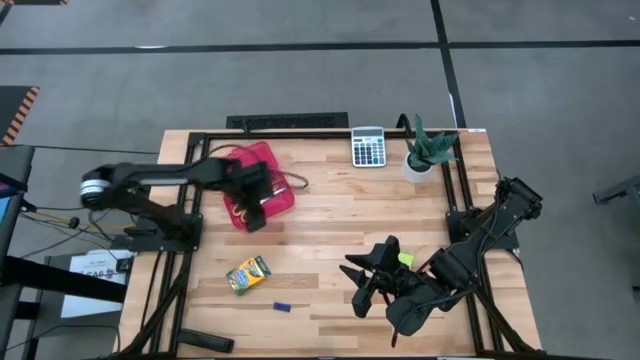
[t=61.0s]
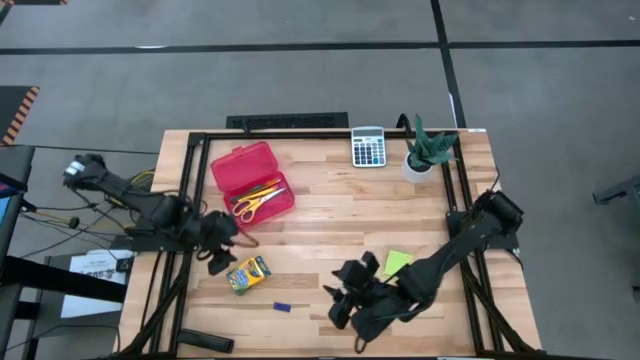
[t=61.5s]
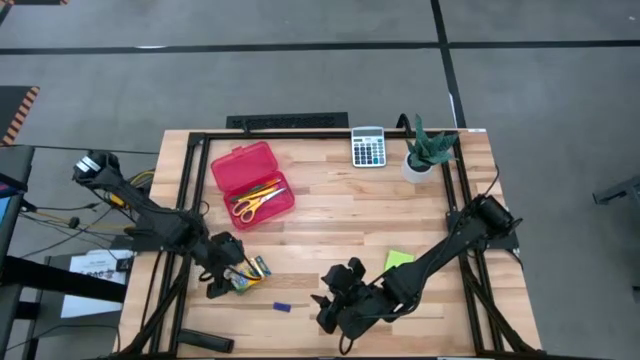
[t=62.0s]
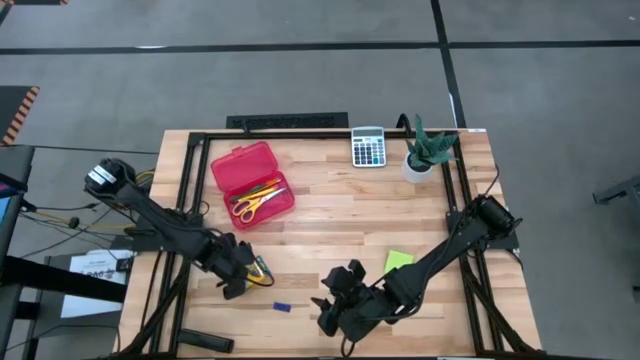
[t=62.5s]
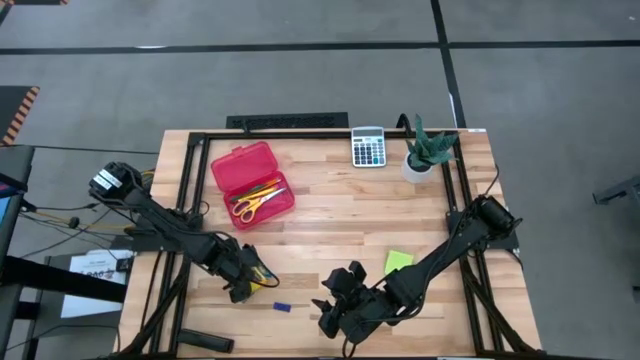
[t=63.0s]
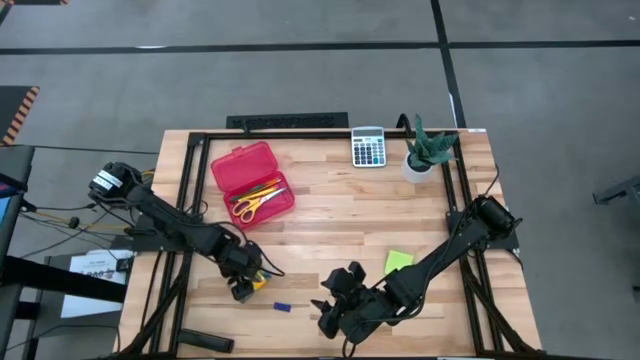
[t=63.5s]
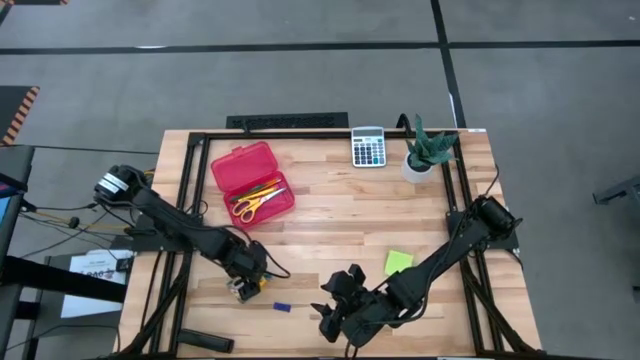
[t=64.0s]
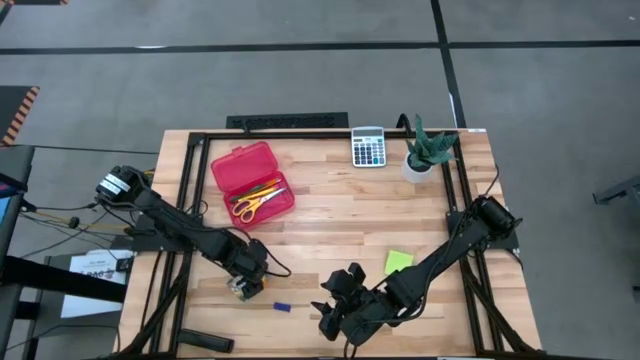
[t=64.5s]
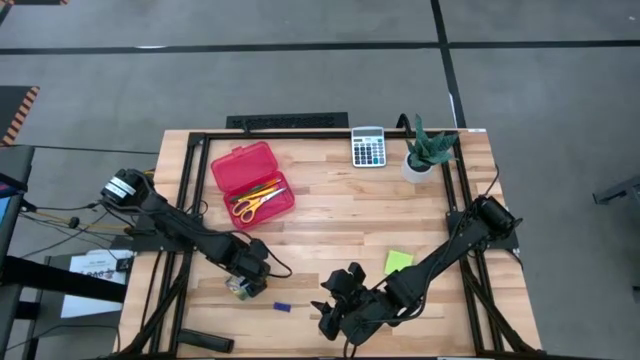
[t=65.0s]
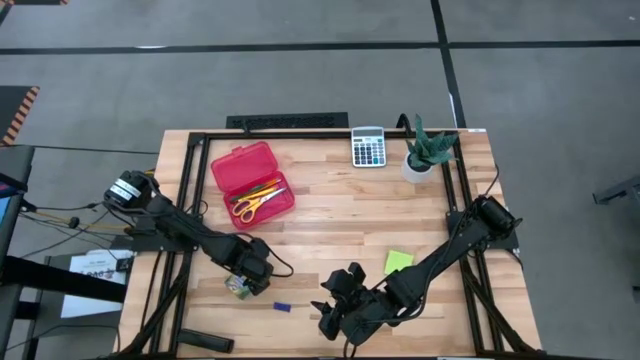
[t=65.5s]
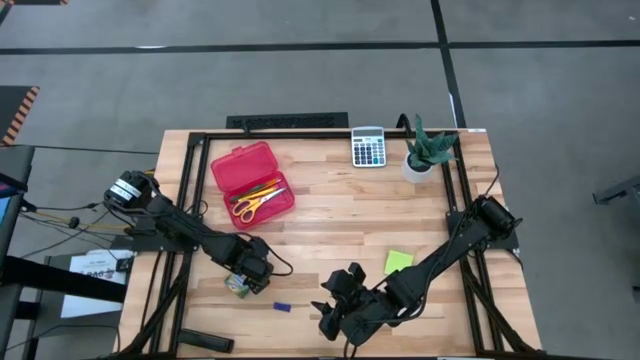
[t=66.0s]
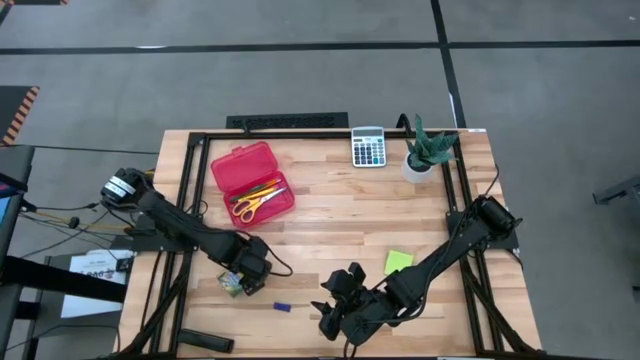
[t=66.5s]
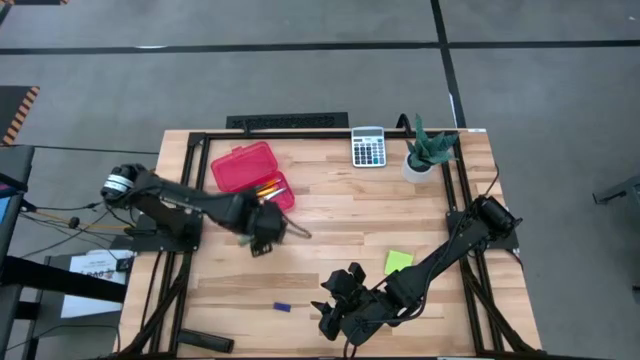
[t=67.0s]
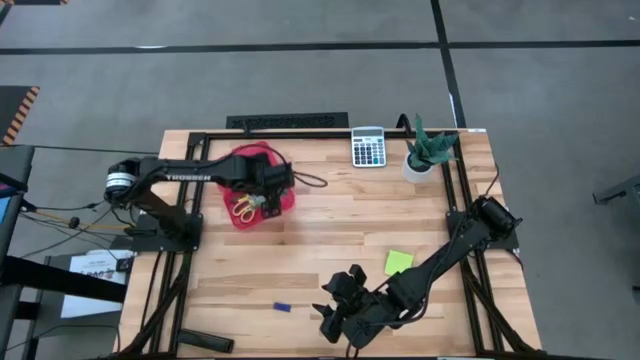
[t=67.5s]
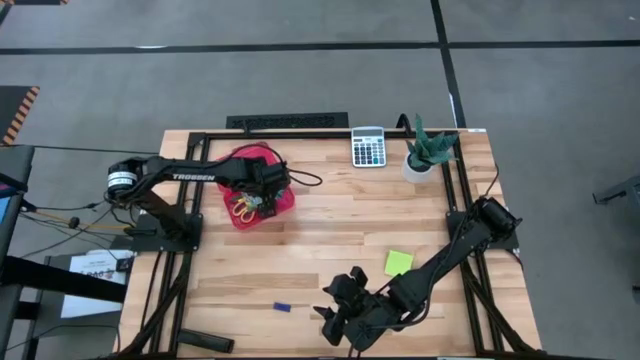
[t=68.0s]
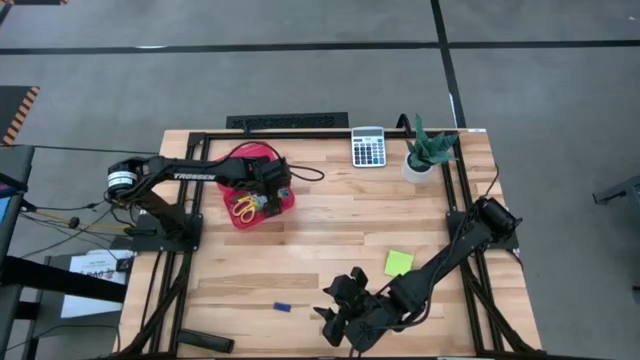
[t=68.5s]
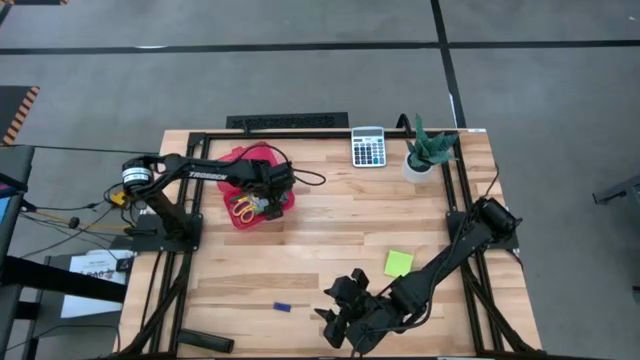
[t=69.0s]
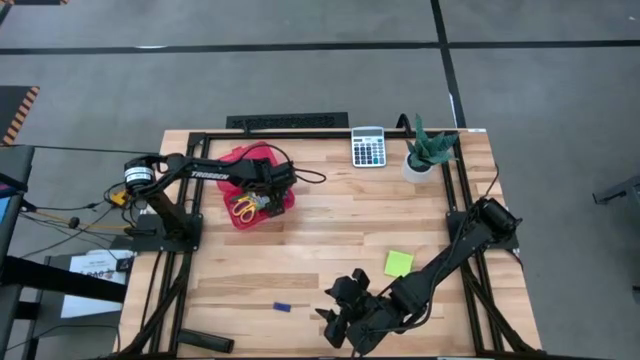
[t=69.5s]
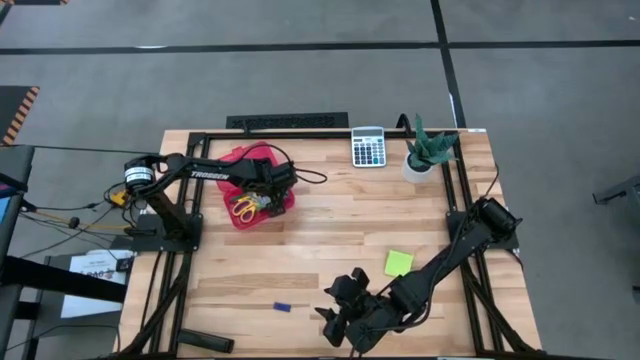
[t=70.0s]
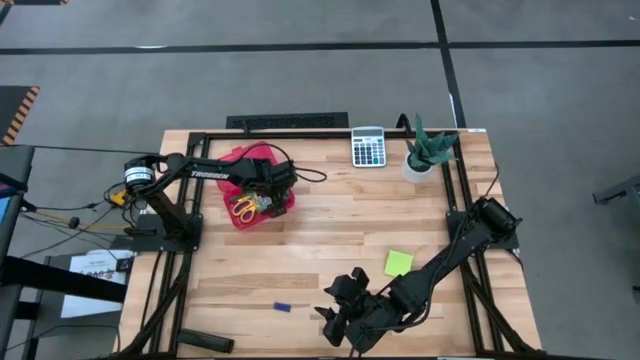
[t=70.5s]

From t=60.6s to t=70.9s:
Task: Pack school essentials
Put the yellow crayon box into the red supply box

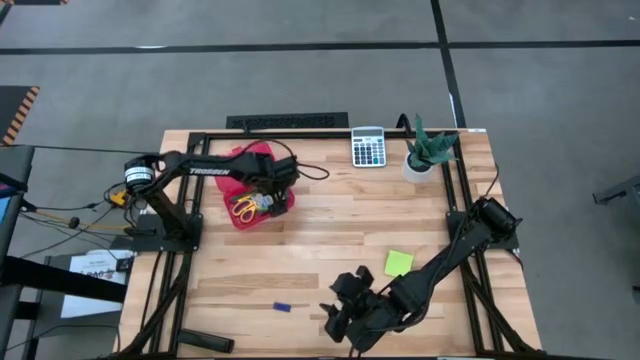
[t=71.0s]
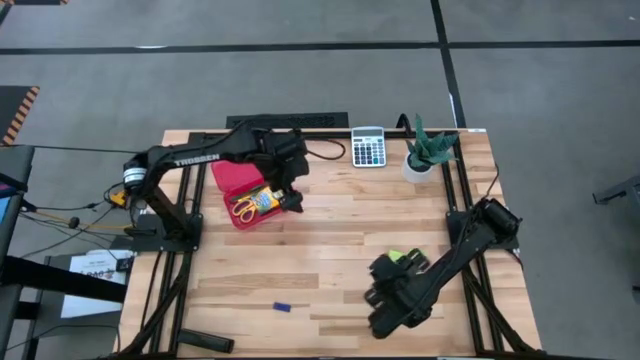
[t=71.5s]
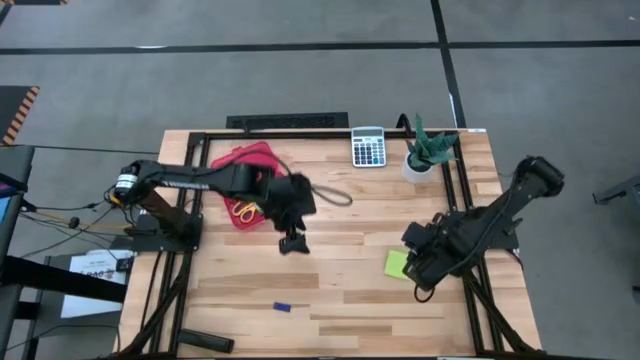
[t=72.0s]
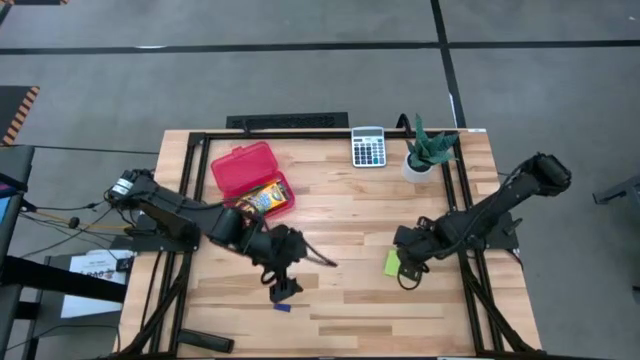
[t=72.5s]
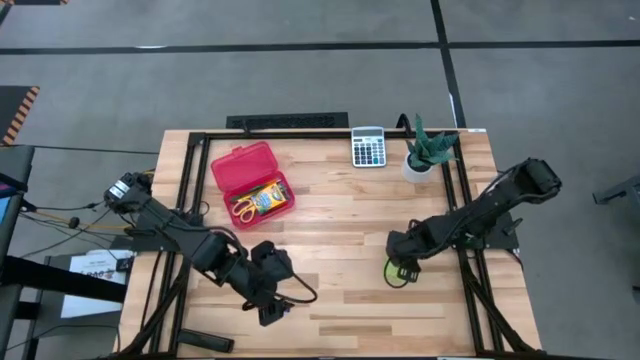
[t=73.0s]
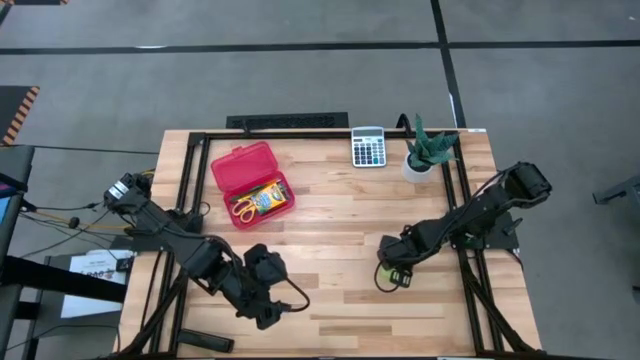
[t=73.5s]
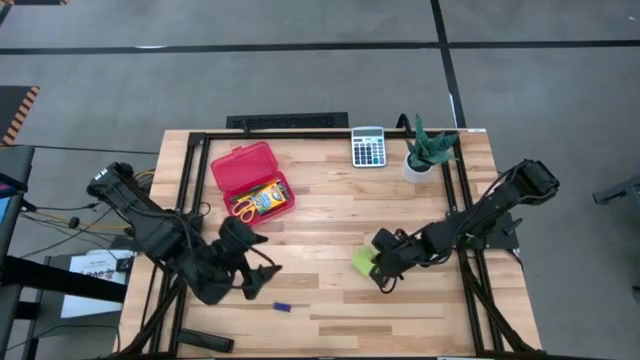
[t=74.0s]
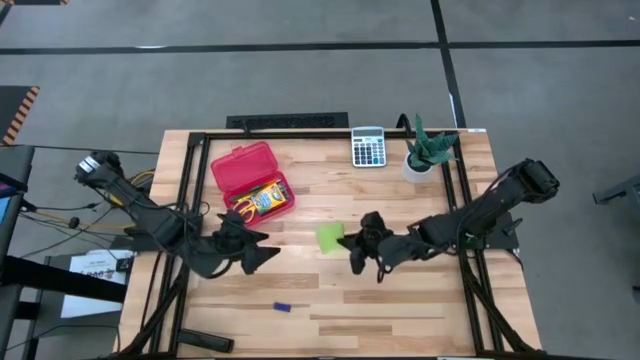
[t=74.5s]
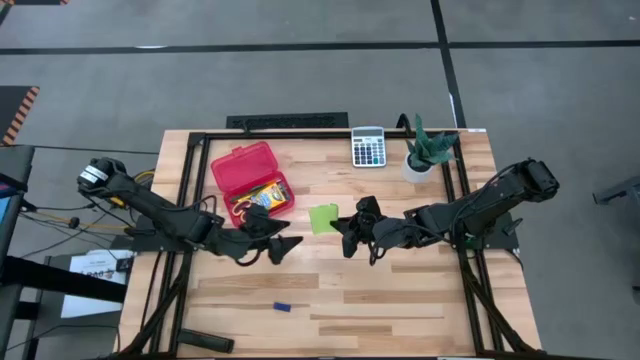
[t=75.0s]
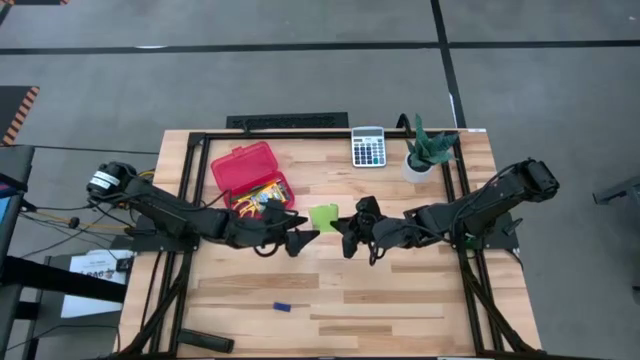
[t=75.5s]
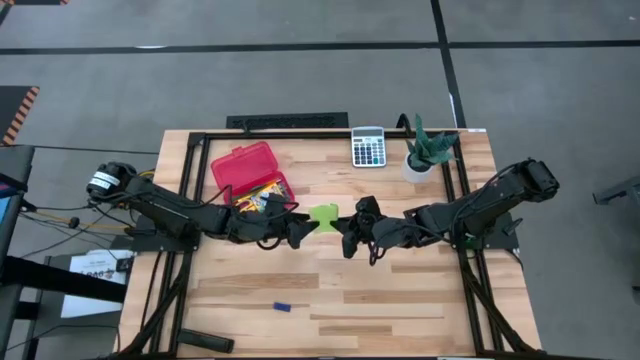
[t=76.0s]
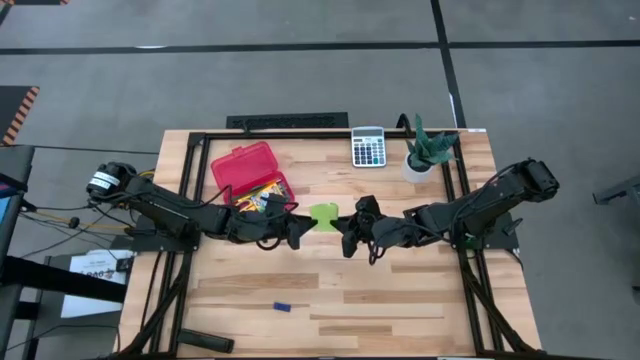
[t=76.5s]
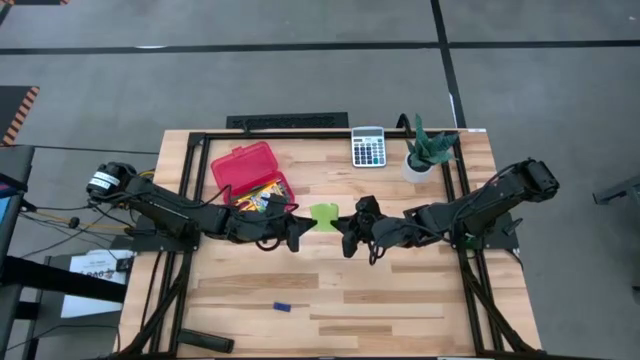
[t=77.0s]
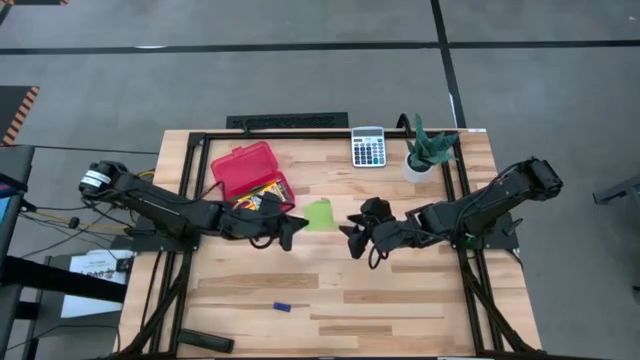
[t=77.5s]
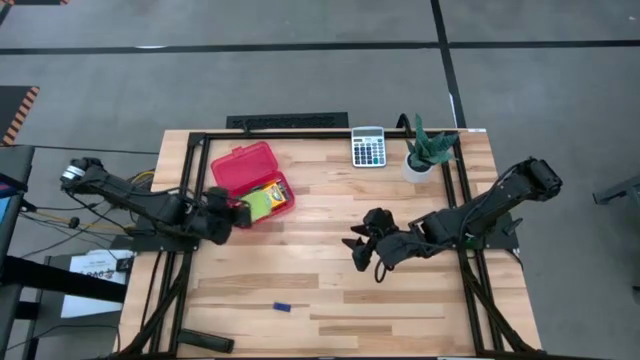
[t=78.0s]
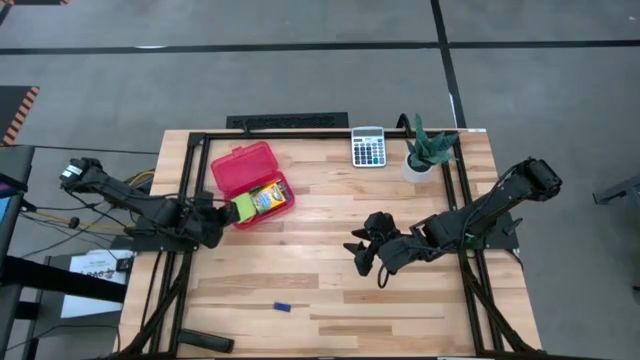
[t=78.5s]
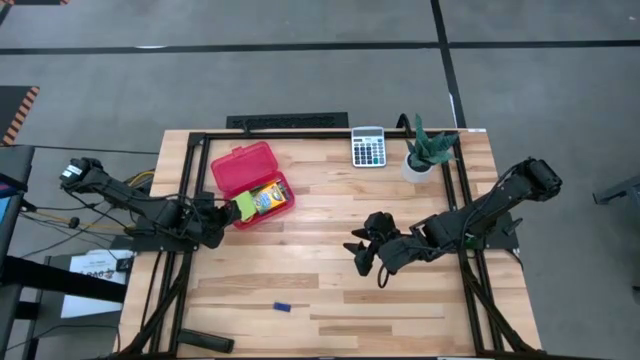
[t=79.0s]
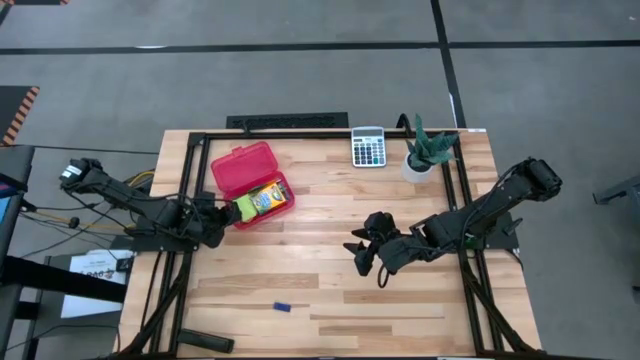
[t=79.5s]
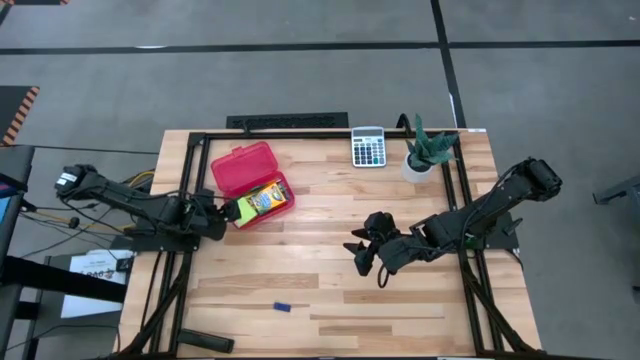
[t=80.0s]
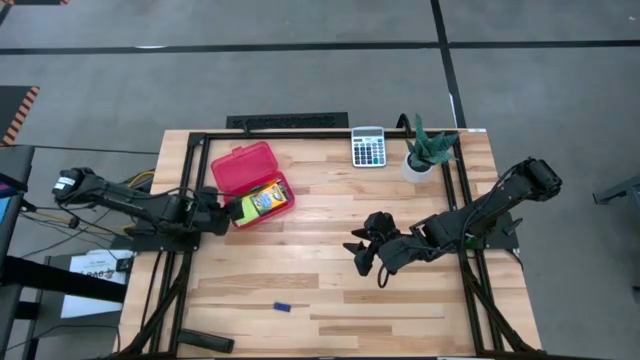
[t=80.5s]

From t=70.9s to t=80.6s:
Put the light green sticky notes into the red supply box

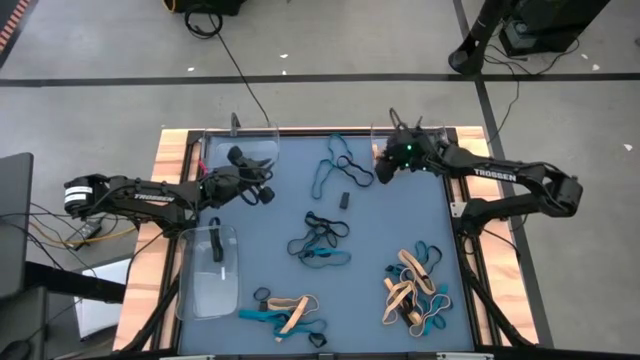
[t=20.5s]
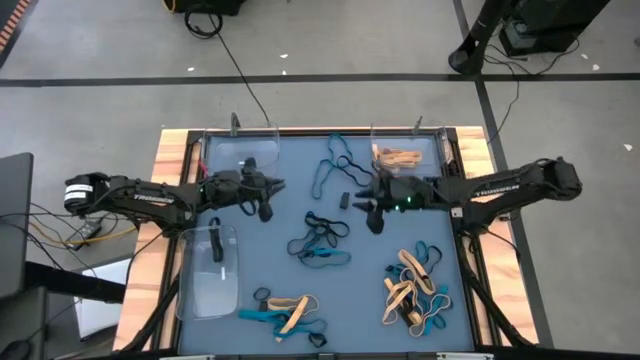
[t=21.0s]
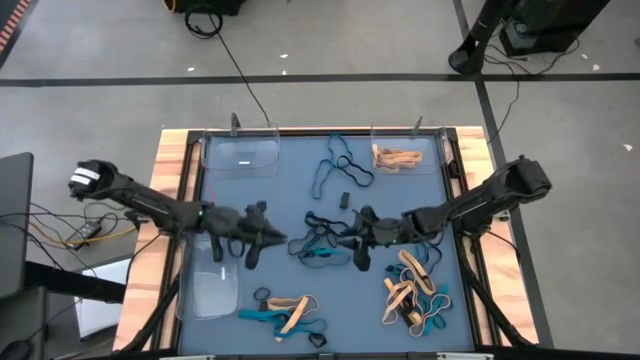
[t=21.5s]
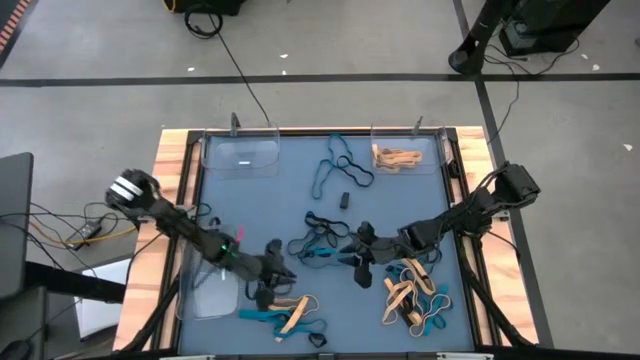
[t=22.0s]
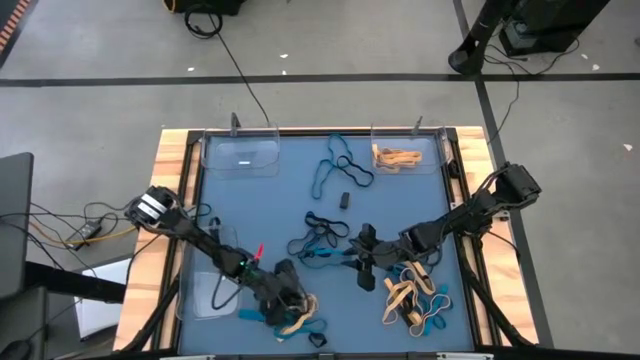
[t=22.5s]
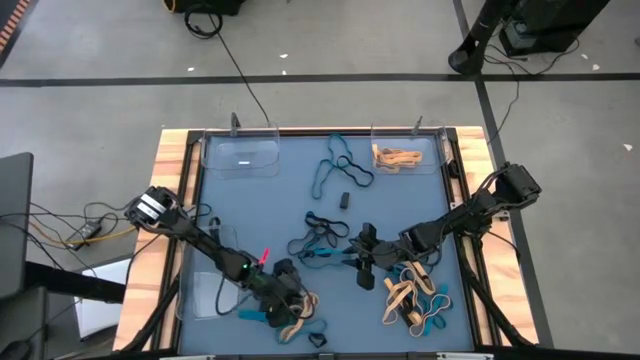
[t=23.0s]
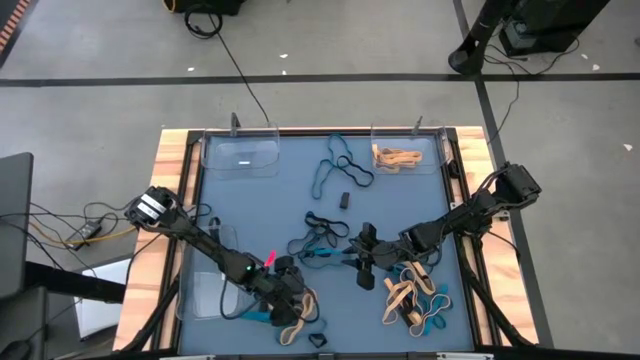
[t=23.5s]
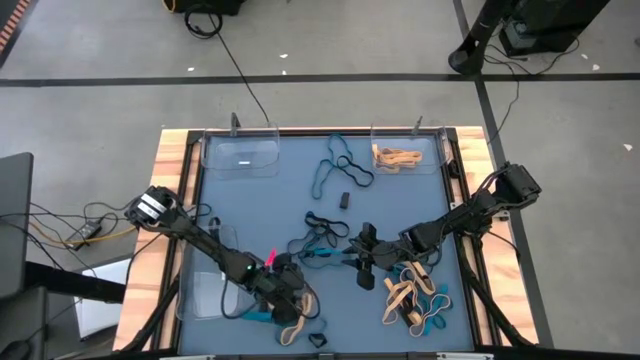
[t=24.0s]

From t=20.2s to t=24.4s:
Task: Sort rubber bands into baskets
Put the yellow rubber band into the top right transparent bin
